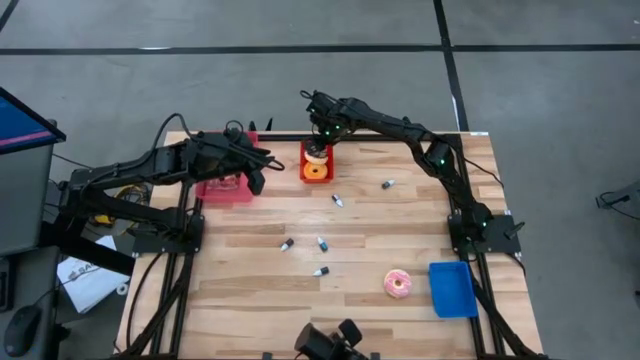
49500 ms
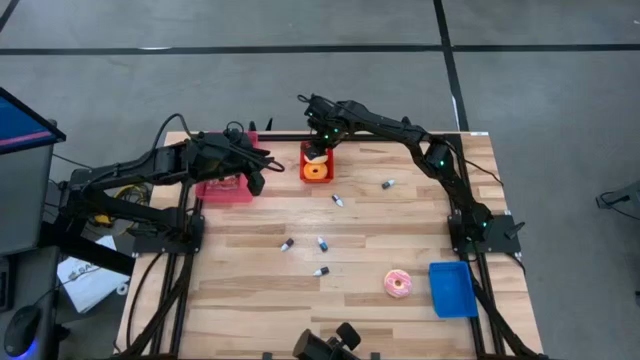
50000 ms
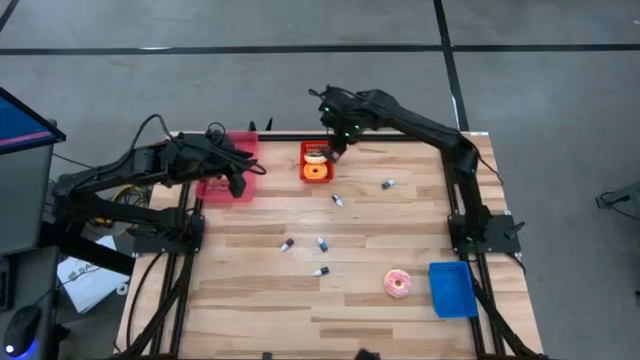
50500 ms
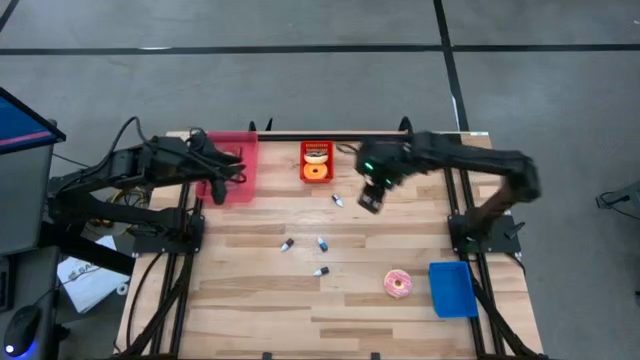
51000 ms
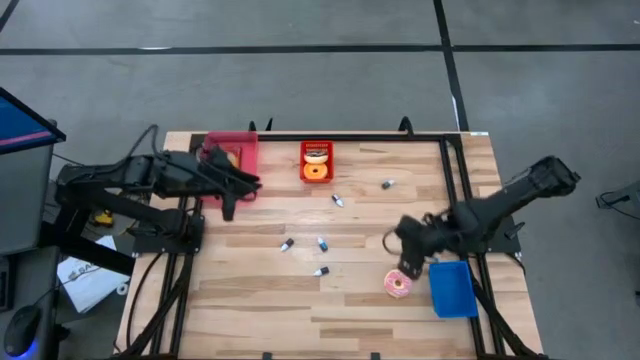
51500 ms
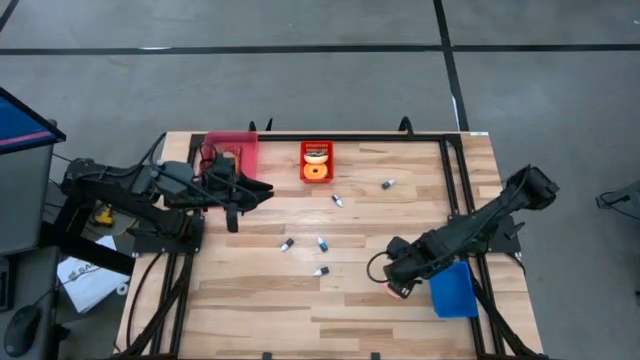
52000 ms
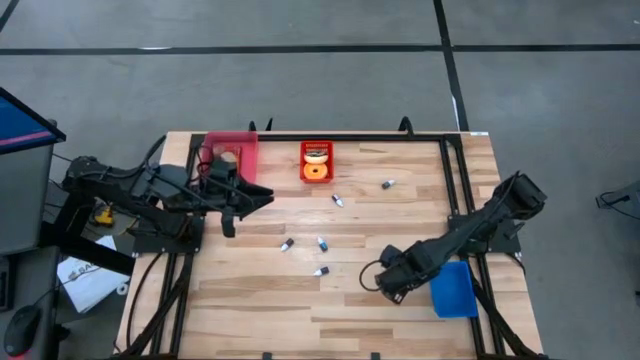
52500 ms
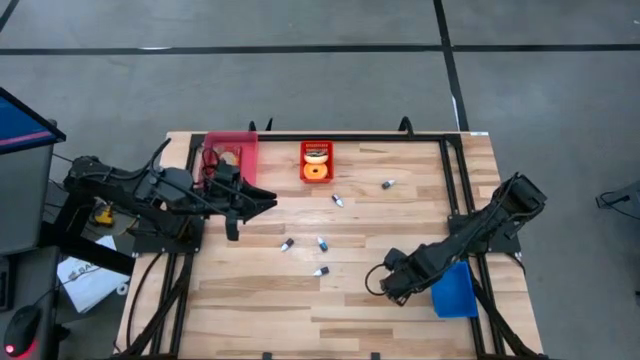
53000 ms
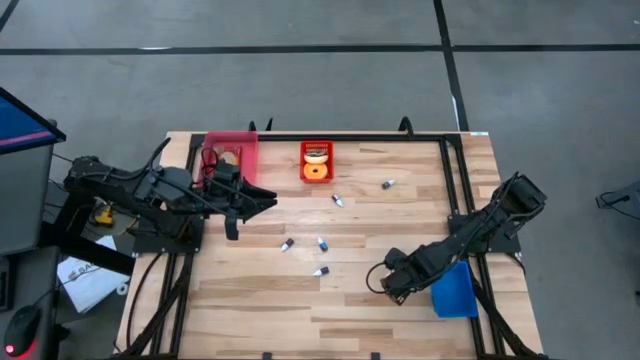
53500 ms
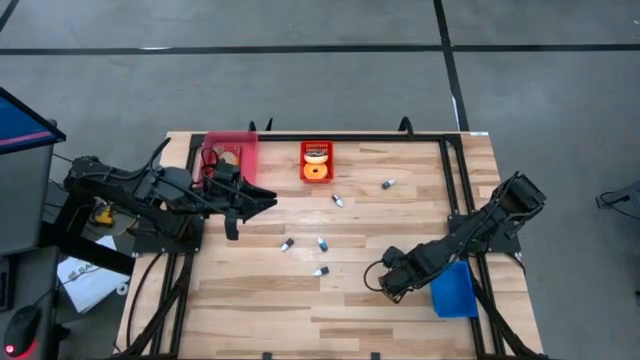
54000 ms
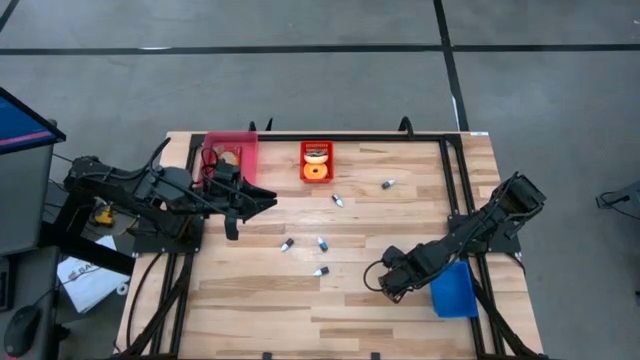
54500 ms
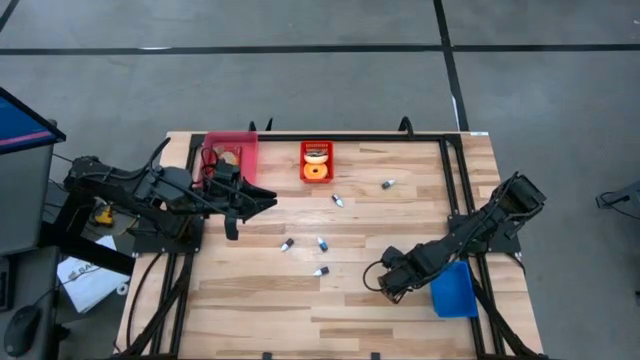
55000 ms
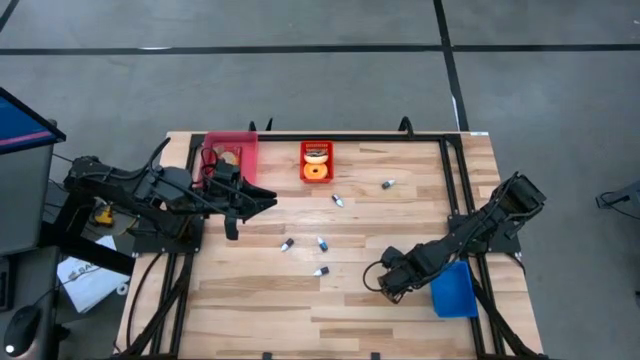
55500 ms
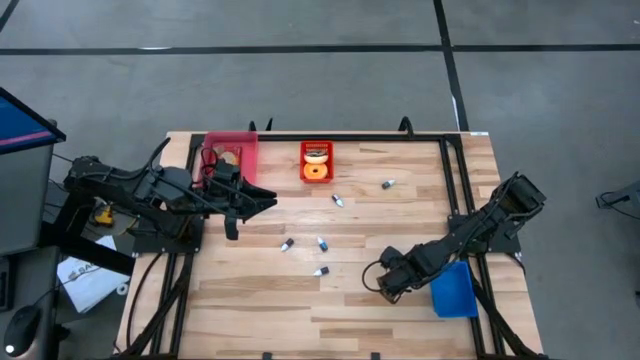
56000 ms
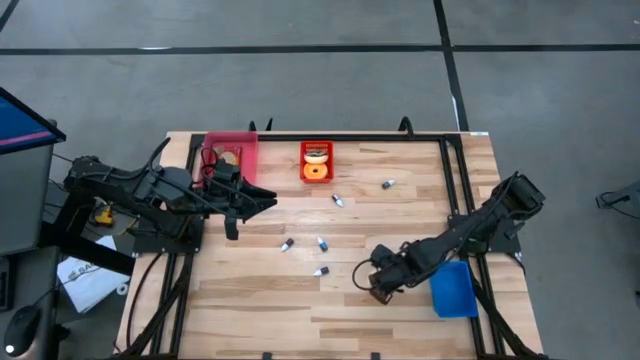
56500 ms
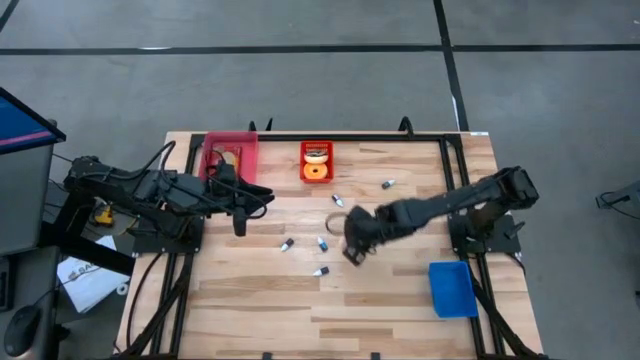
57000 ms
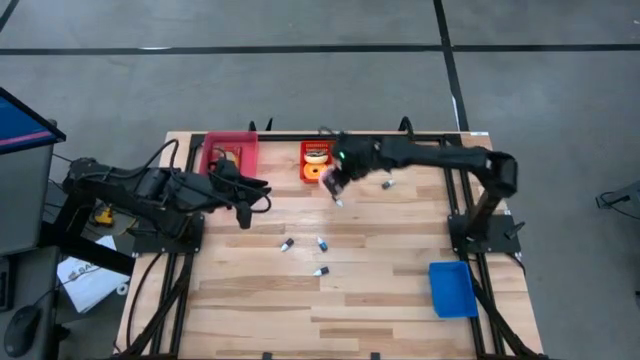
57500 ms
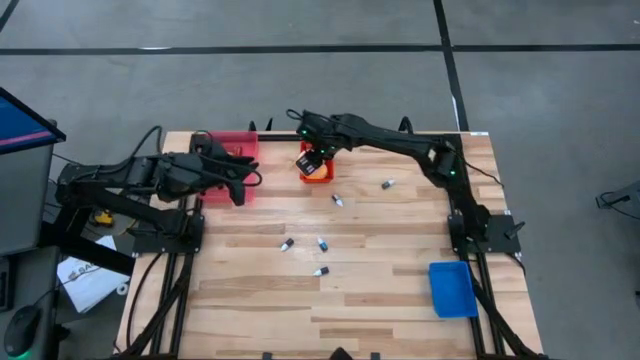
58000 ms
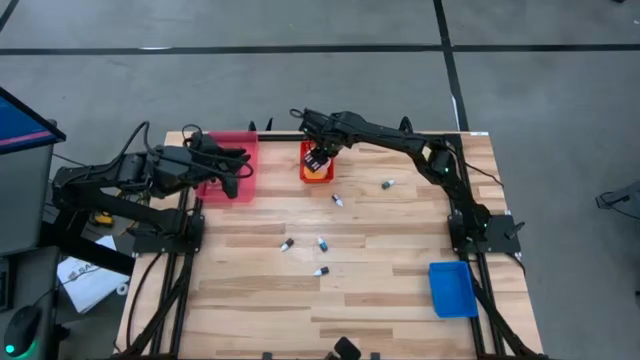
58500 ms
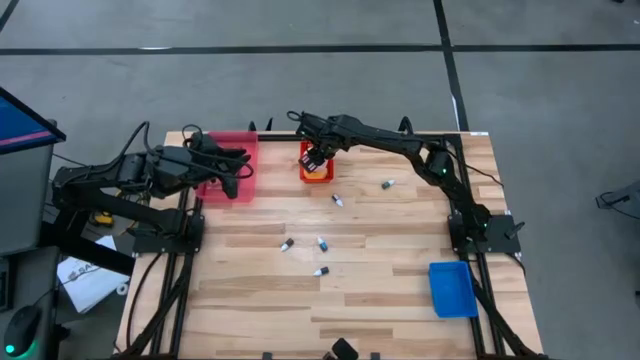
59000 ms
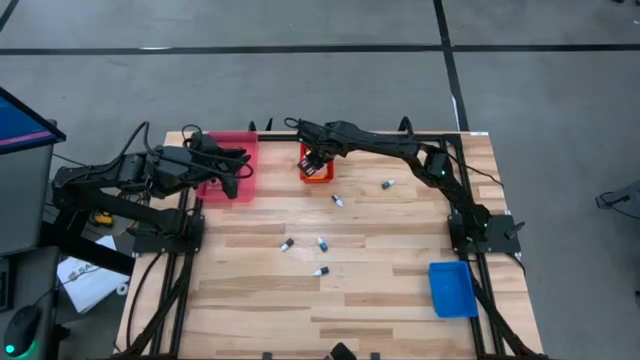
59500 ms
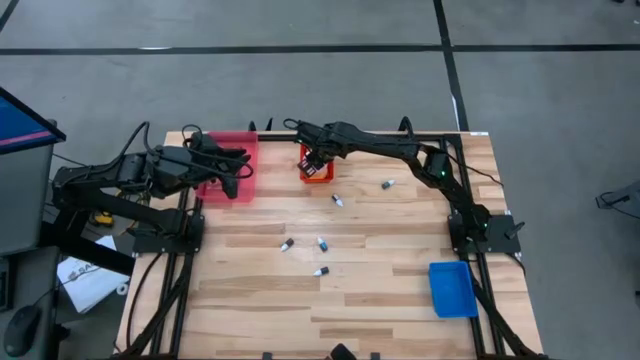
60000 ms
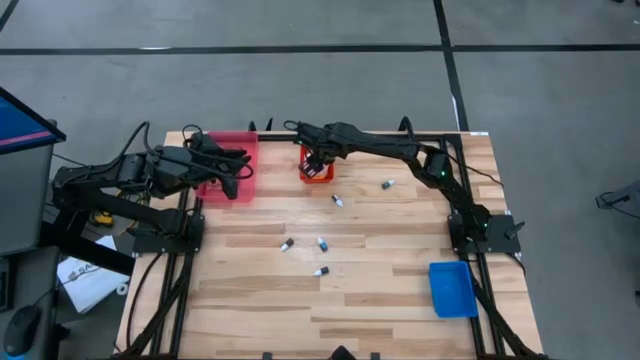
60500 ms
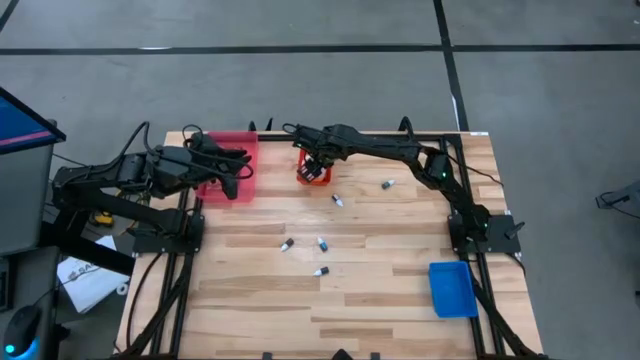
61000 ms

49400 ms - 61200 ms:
Put the pink donut into the red bin

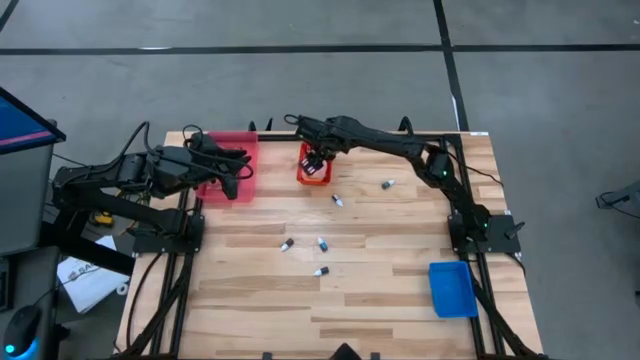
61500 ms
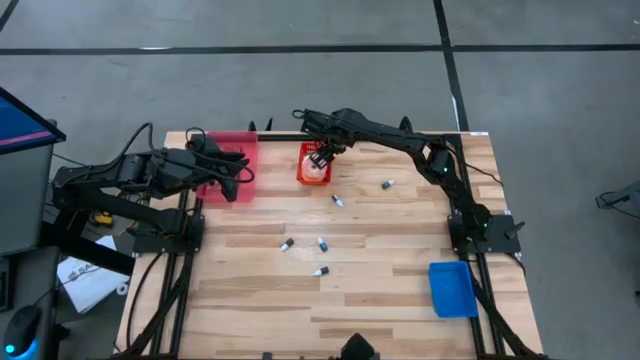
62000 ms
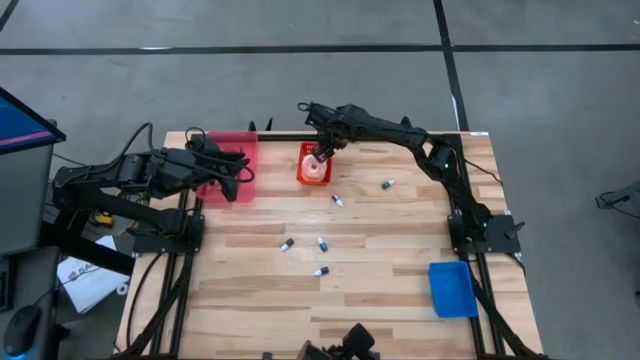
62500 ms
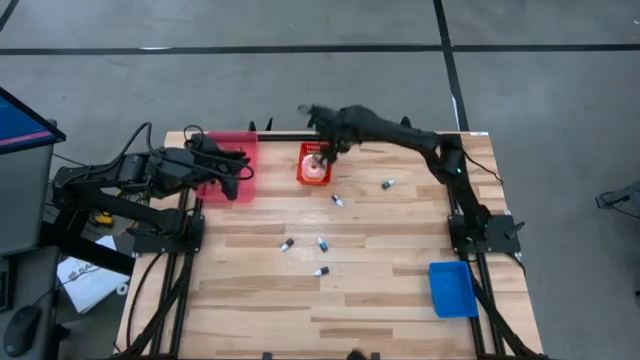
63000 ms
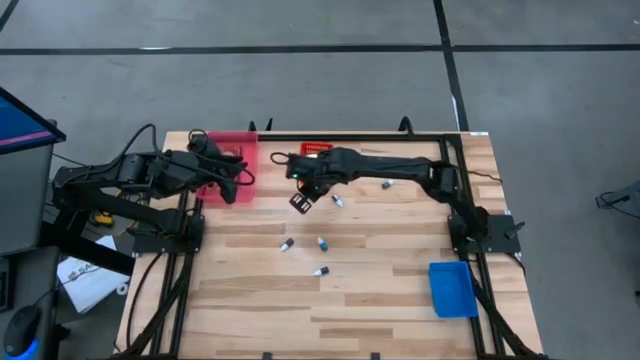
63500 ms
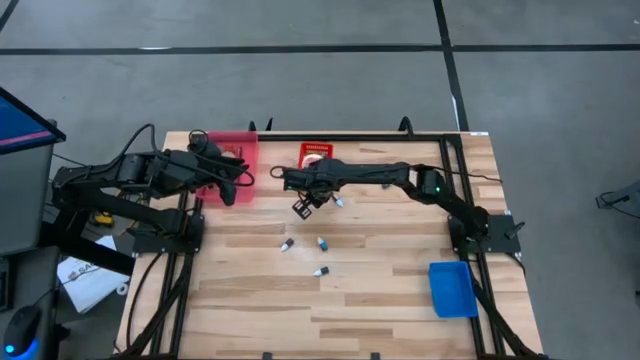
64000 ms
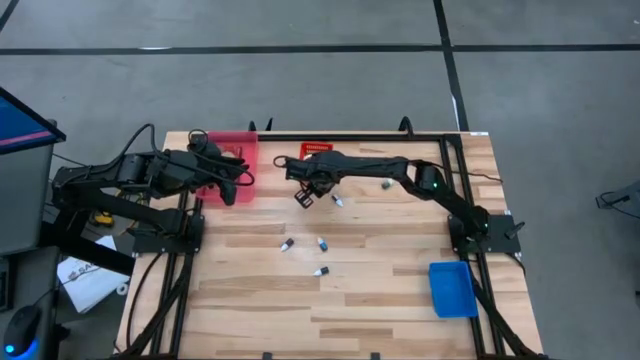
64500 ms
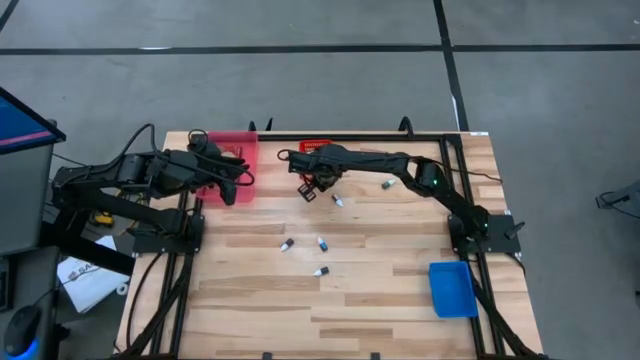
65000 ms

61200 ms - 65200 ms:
Adjust the red bin

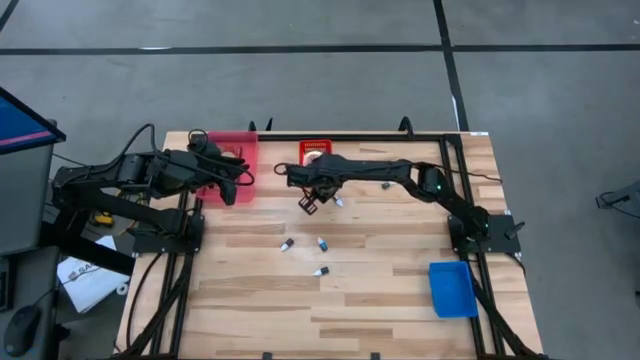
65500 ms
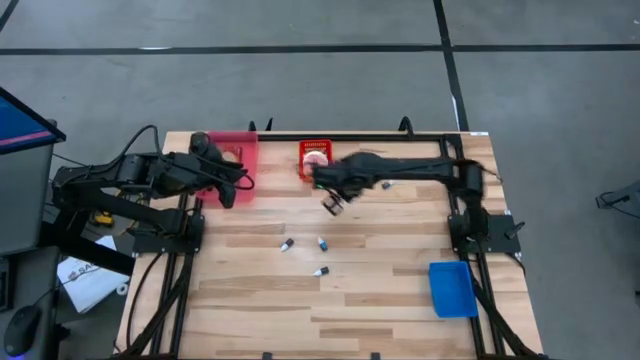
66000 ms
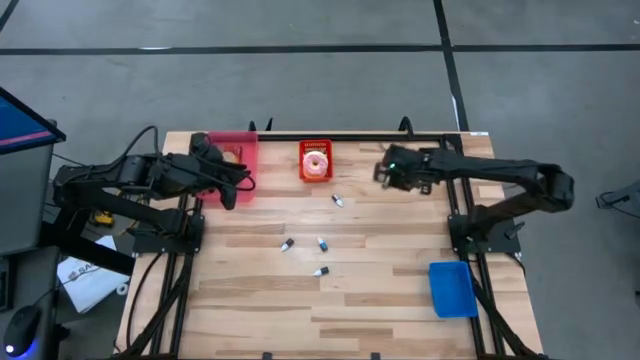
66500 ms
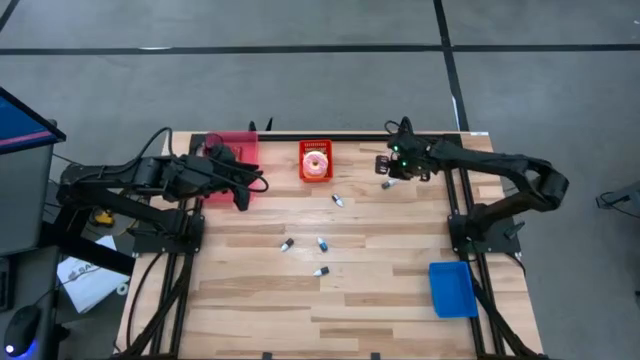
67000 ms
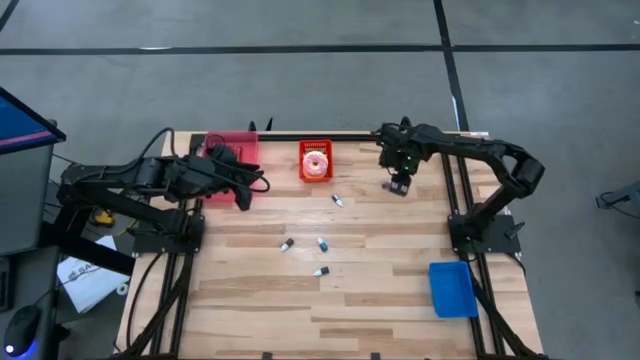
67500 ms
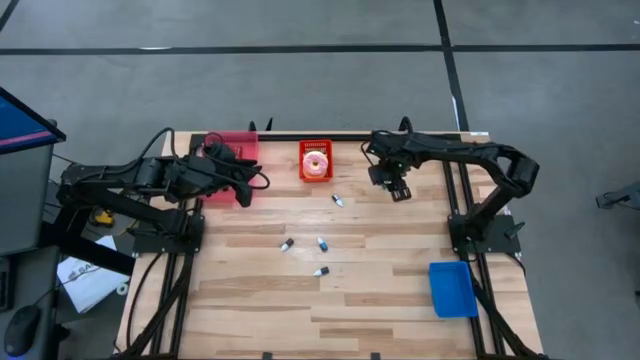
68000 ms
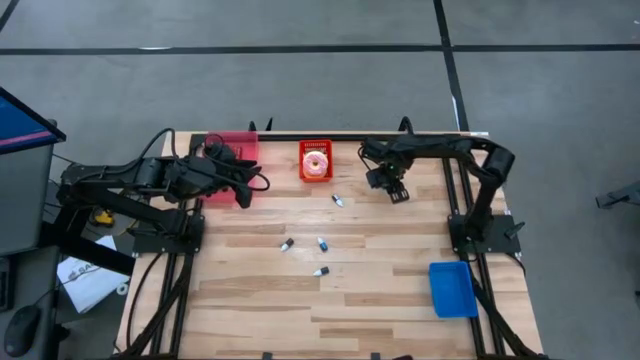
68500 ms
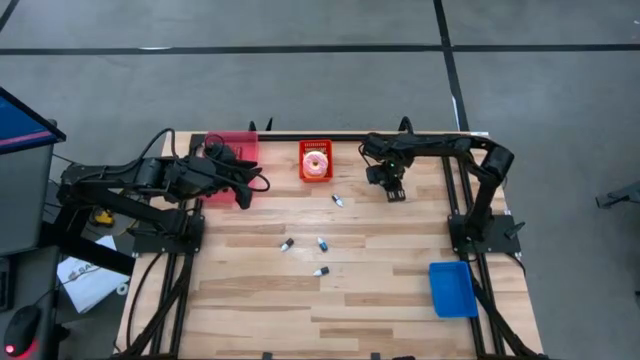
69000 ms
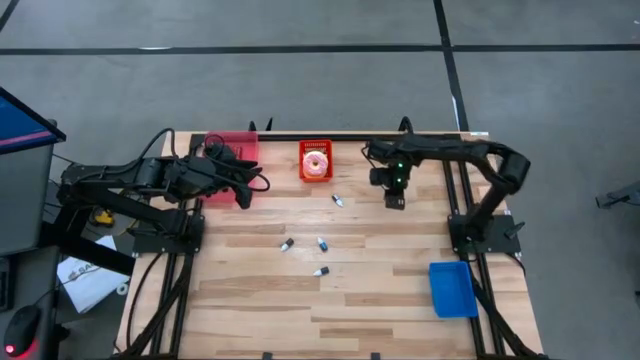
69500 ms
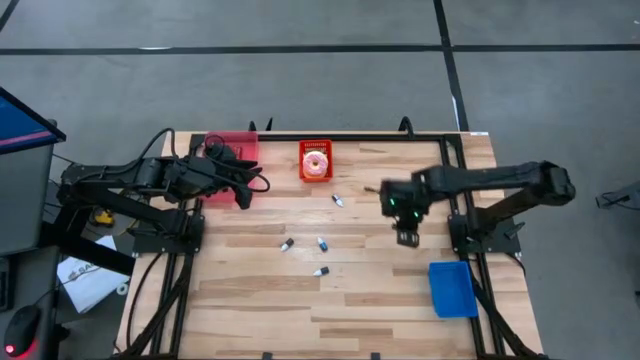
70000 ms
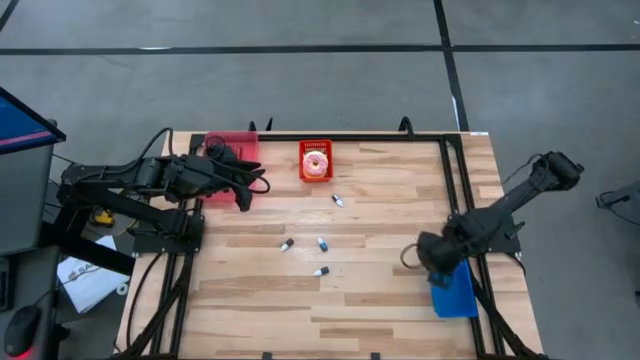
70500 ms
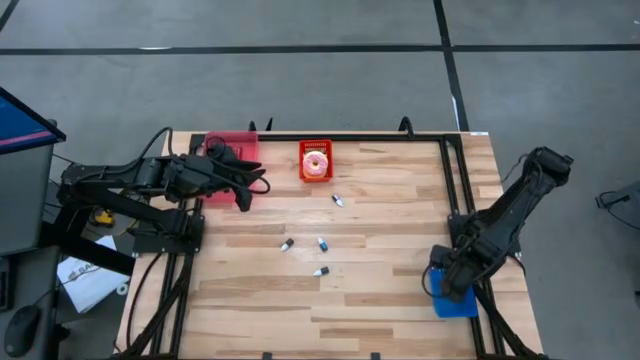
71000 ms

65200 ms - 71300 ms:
Put the green food coloring into the blue bin
